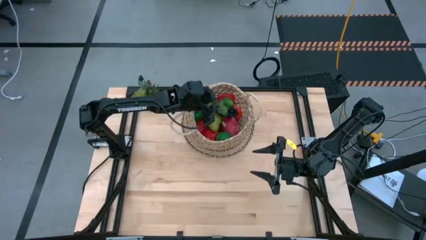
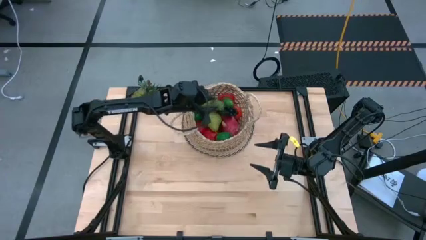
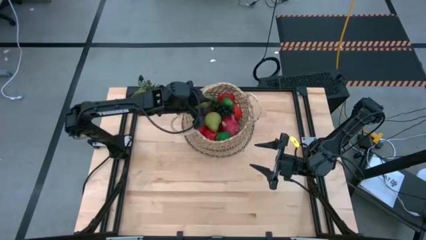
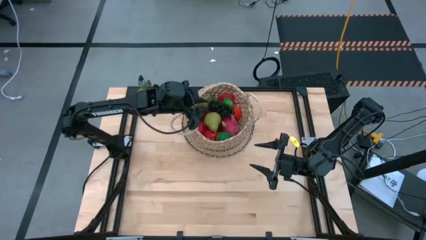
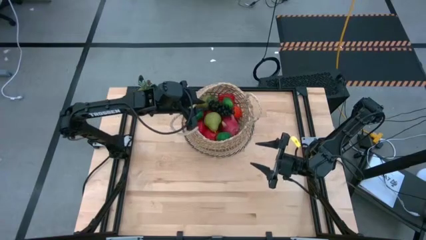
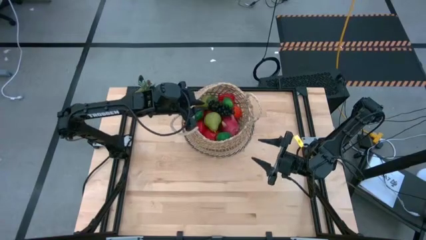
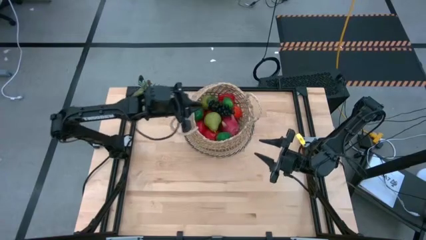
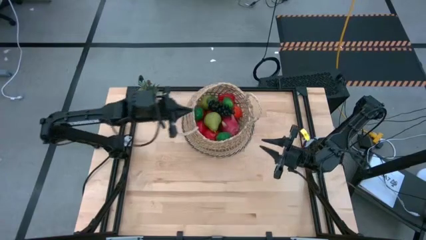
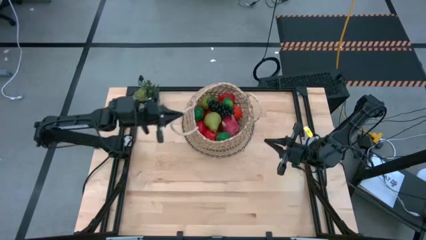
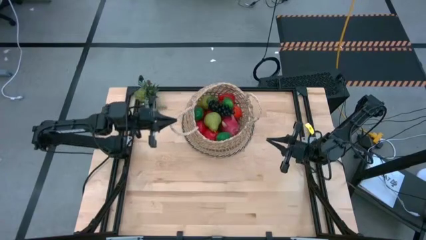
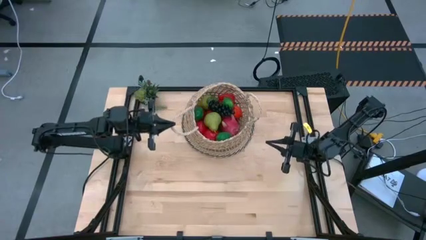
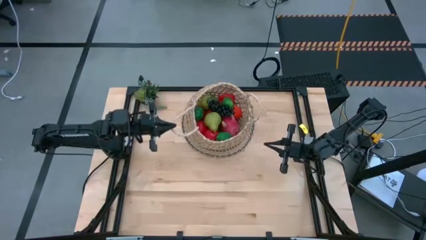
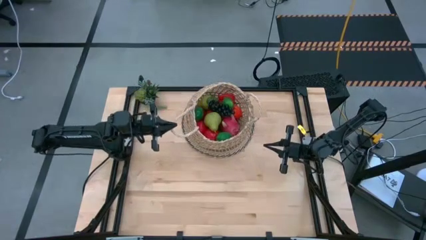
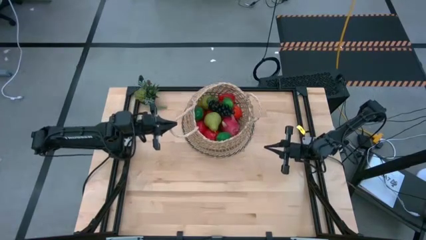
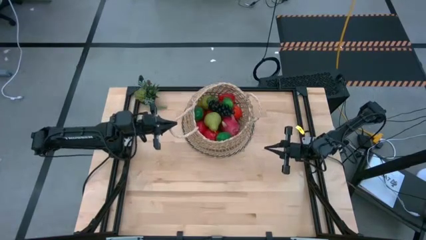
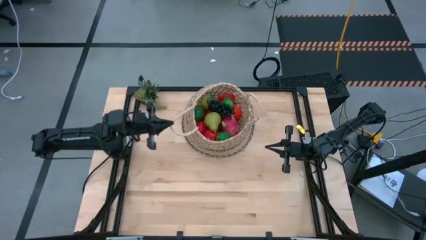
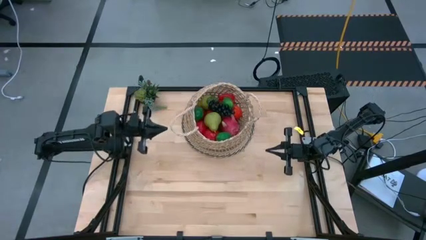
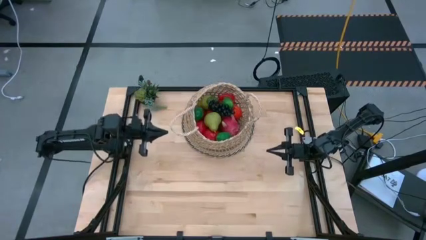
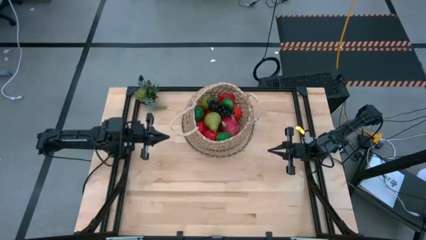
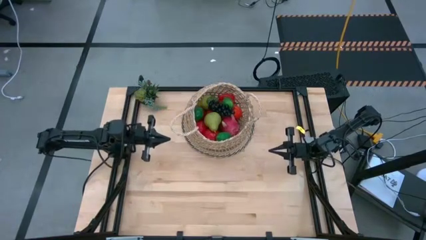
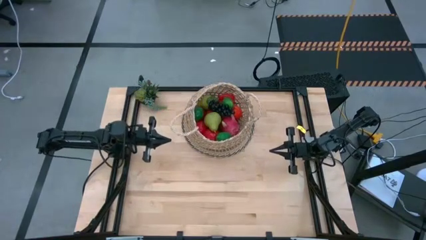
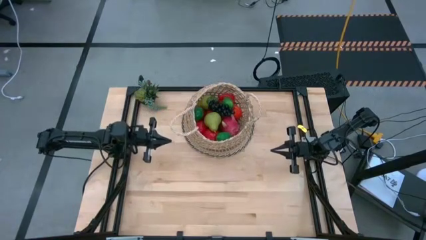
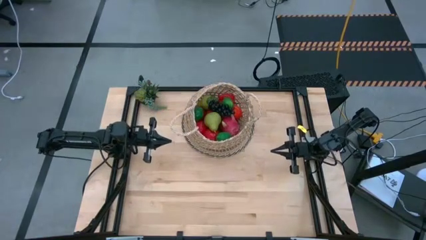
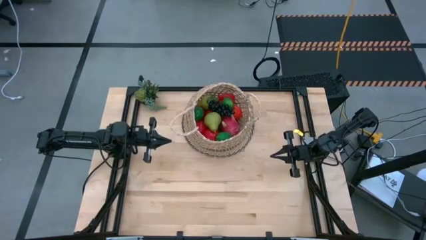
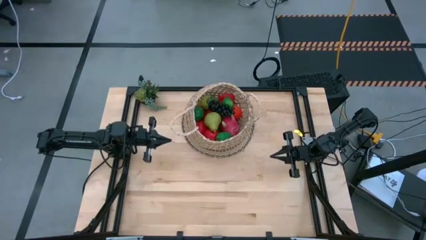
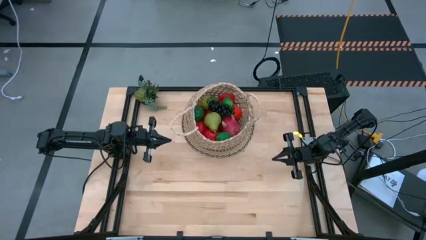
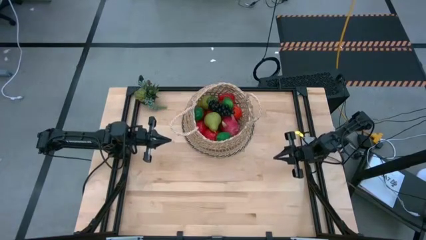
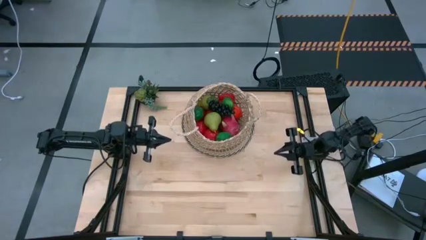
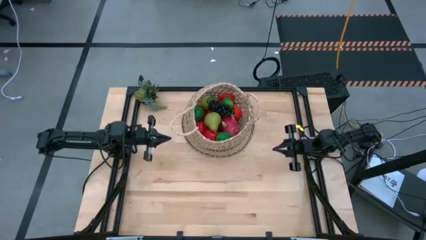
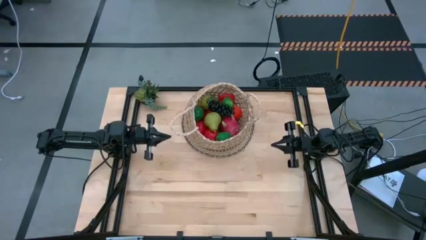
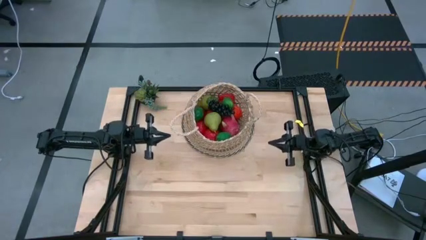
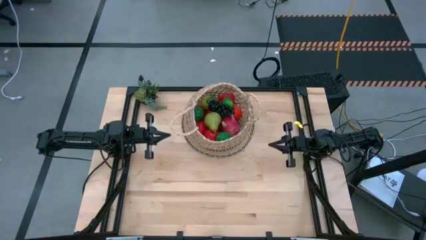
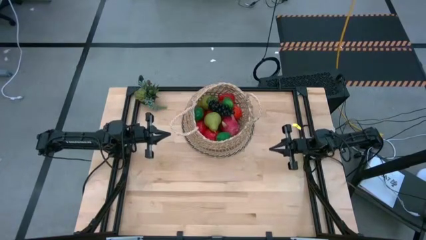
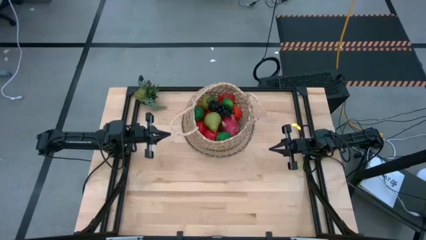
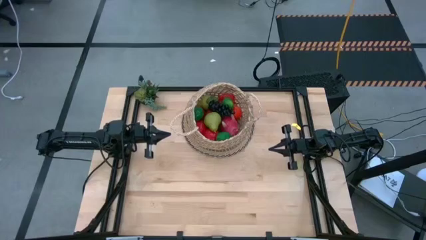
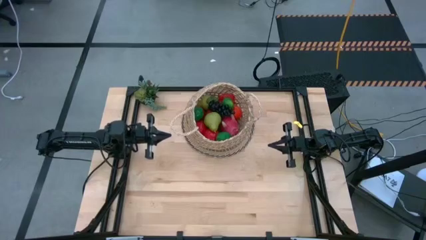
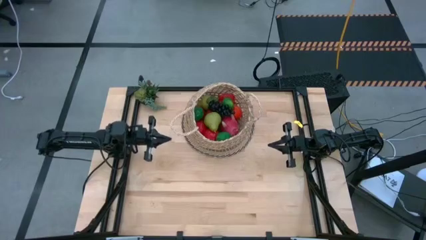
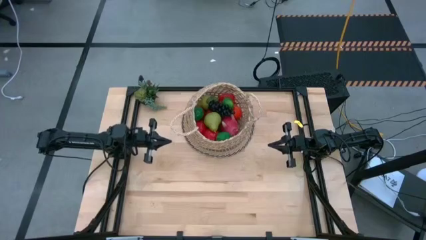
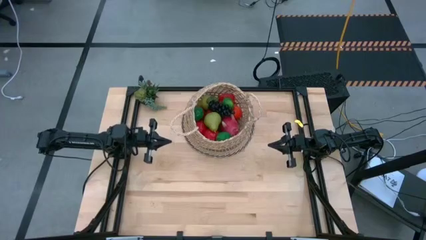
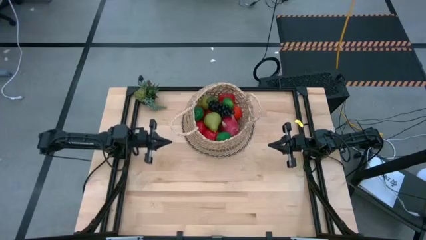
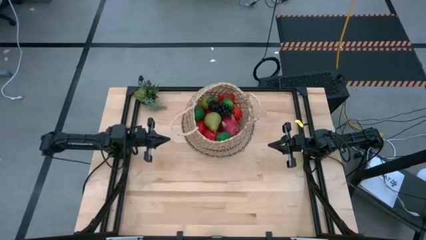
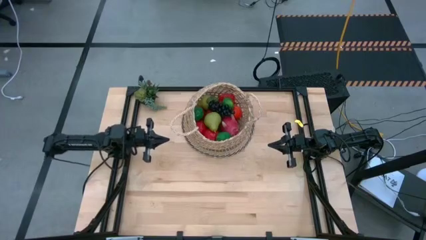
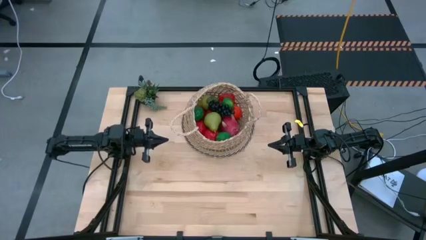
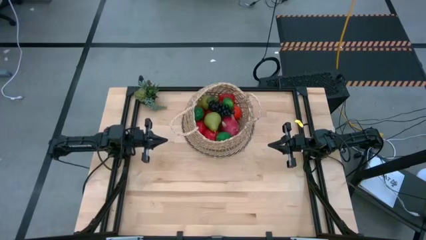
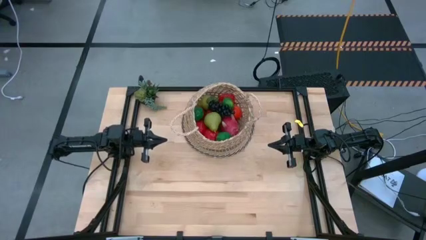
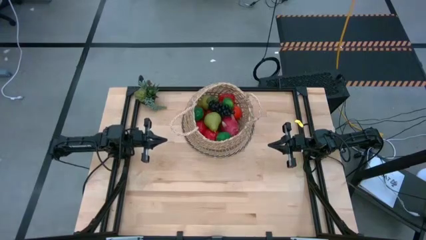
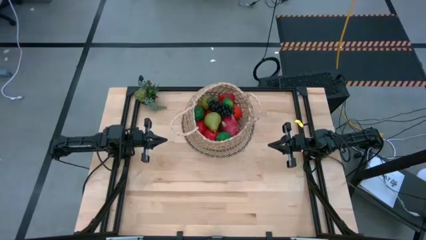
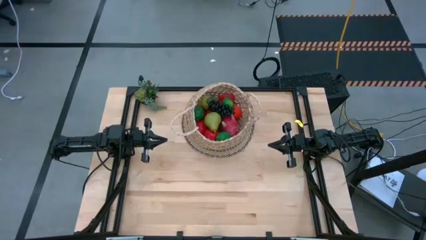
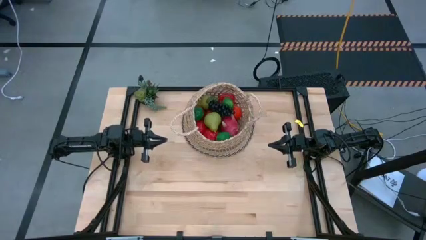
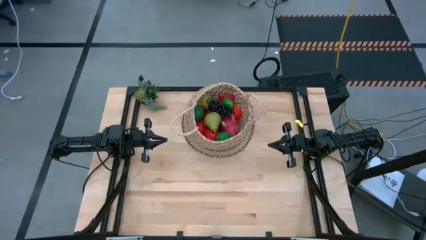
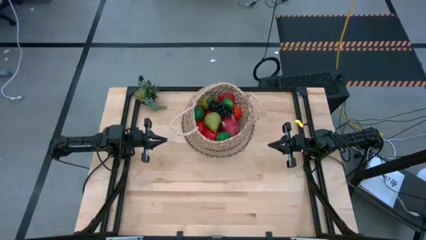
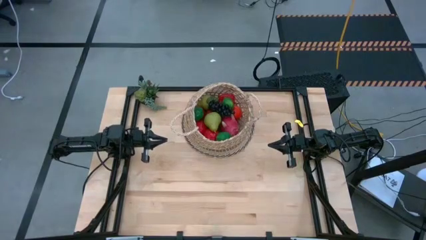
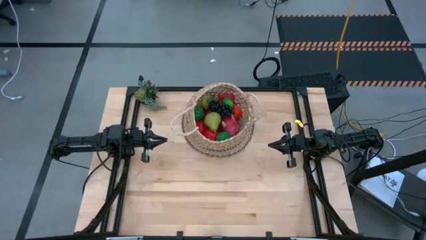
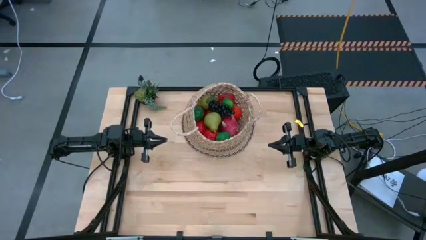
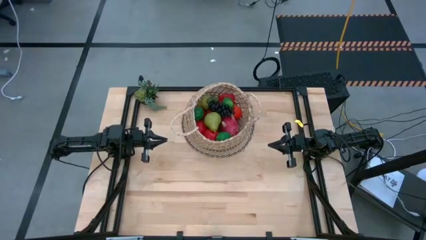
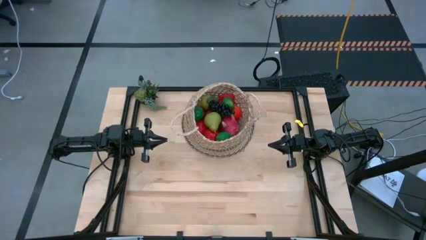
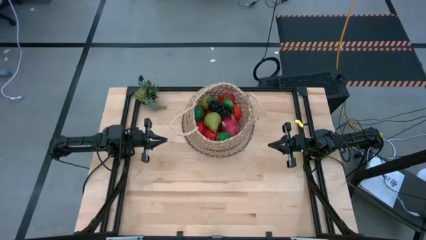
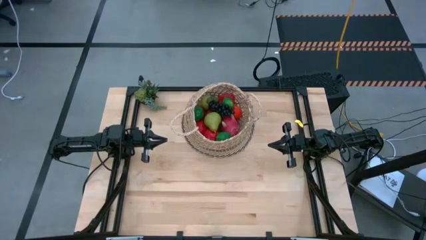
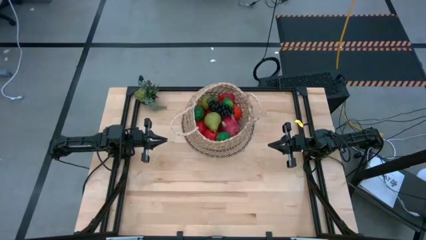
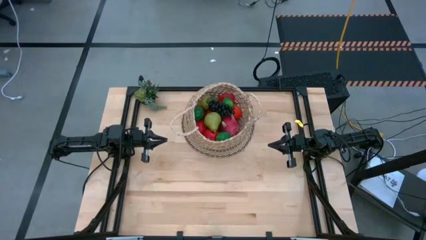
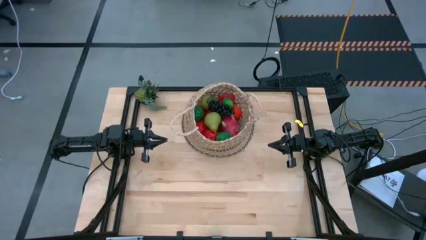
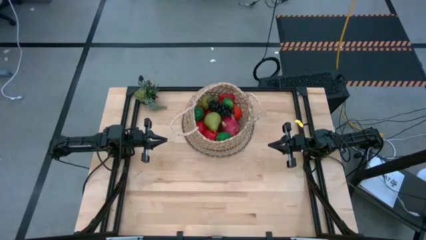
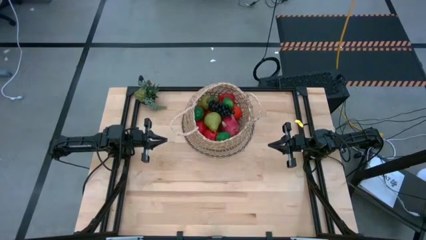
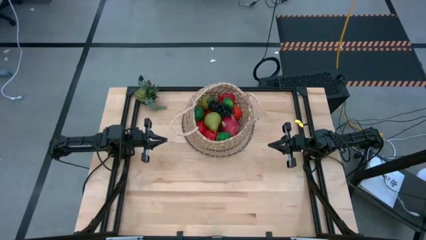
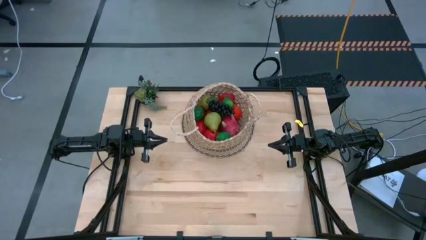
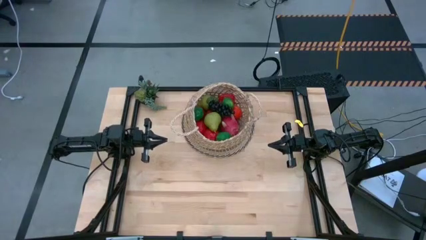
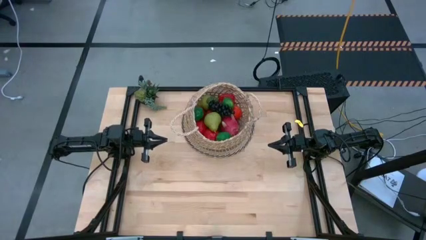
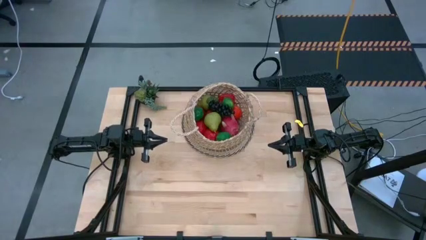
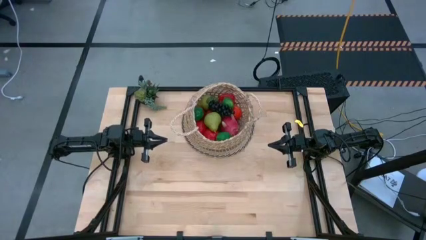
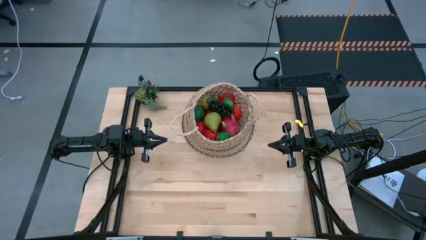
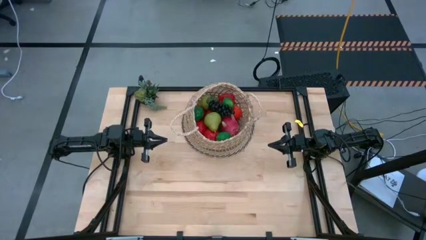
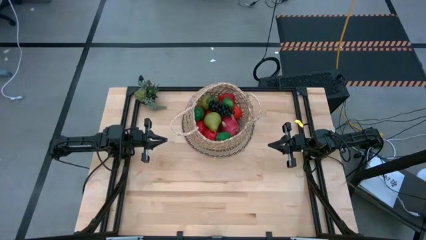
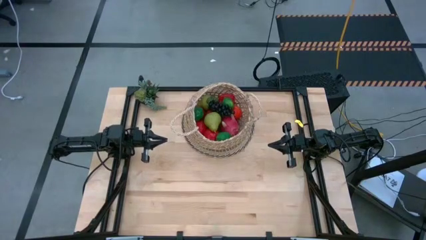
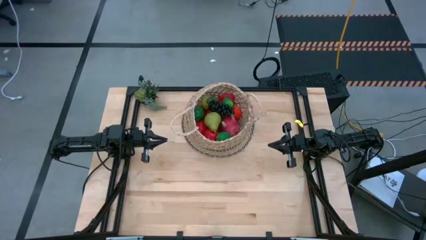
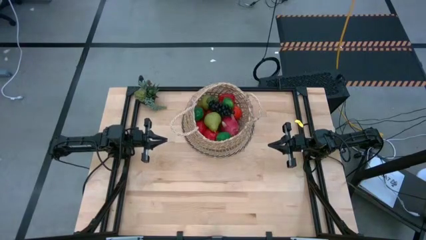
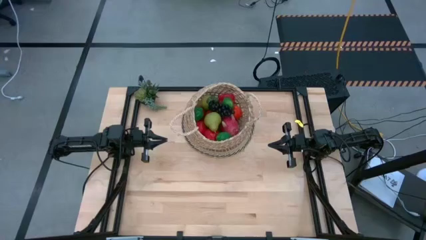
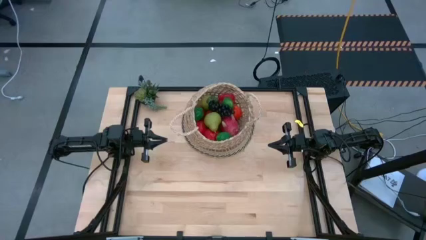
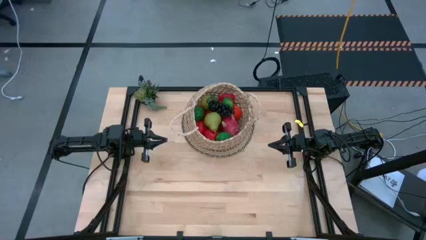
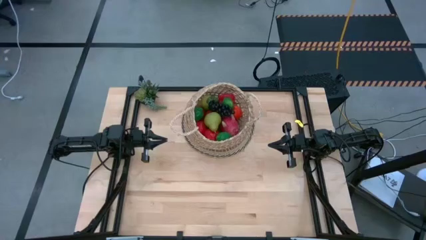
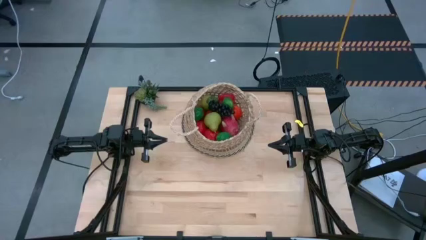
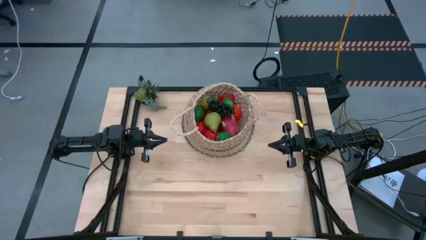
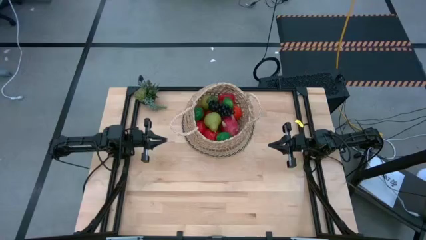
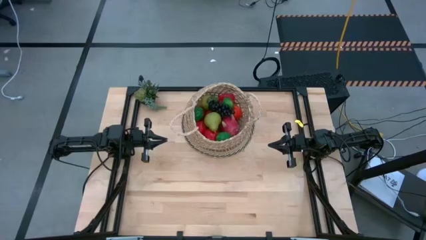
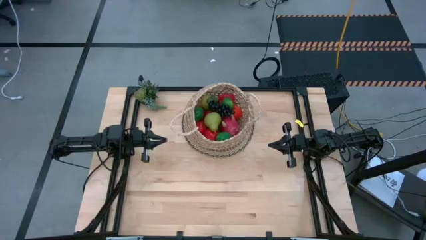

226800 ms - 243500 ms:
Task: Build produce basket
Return to Home Position
